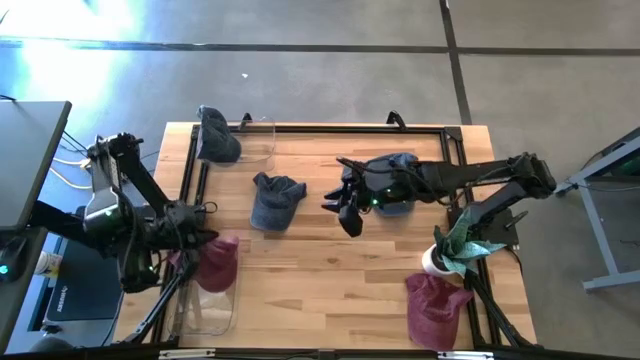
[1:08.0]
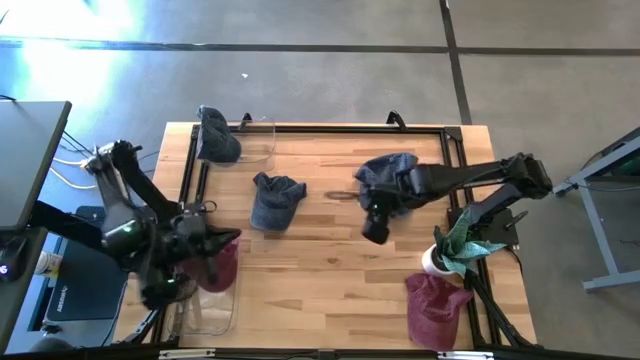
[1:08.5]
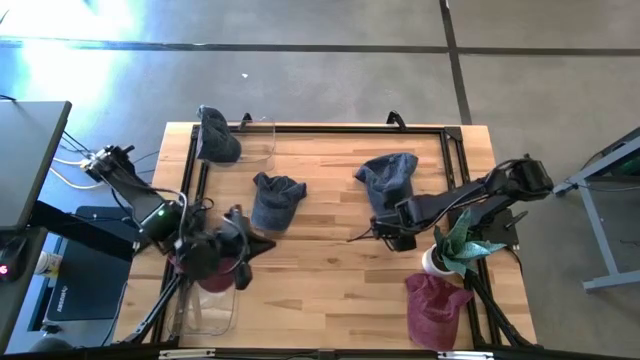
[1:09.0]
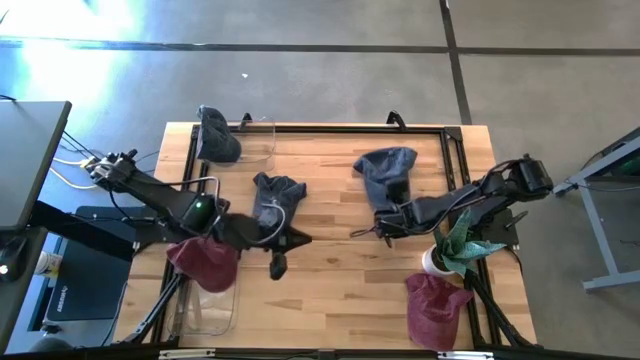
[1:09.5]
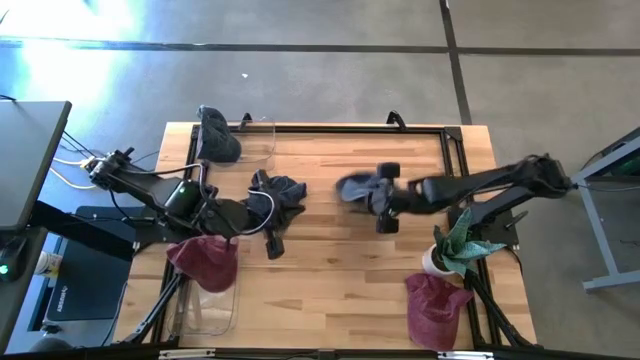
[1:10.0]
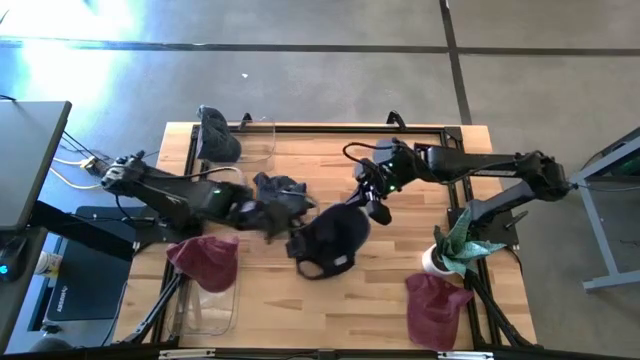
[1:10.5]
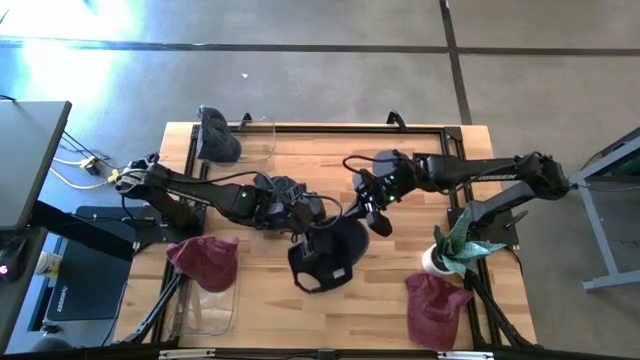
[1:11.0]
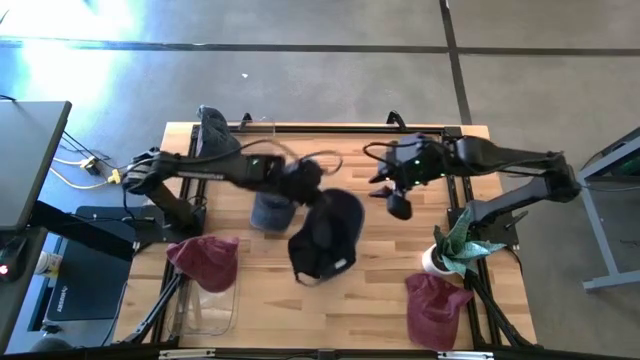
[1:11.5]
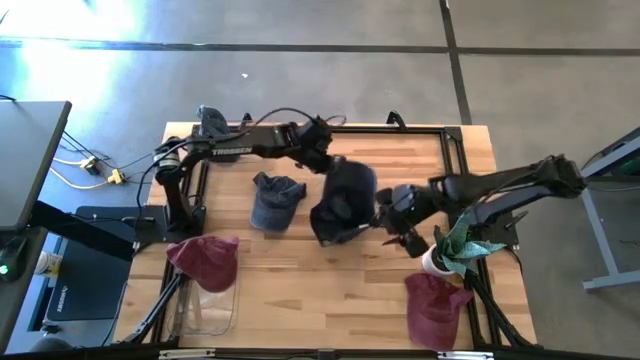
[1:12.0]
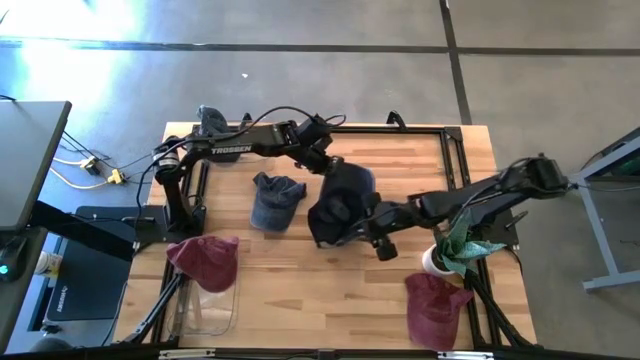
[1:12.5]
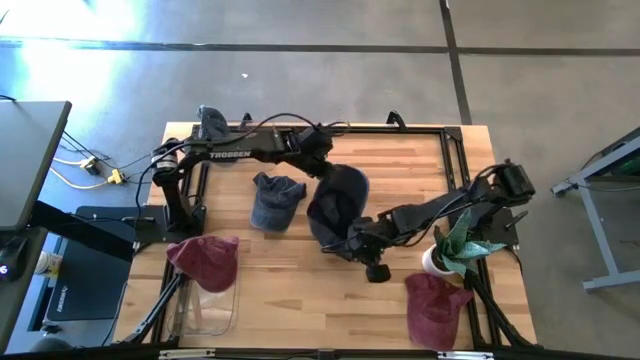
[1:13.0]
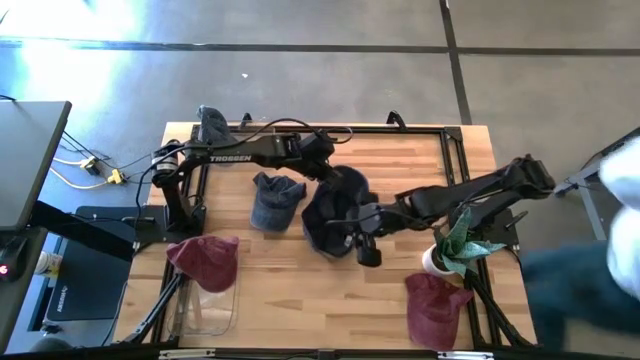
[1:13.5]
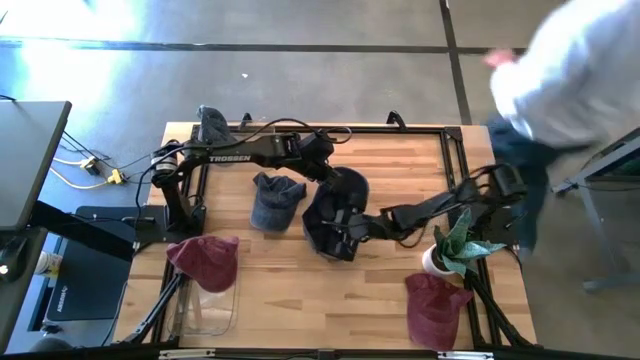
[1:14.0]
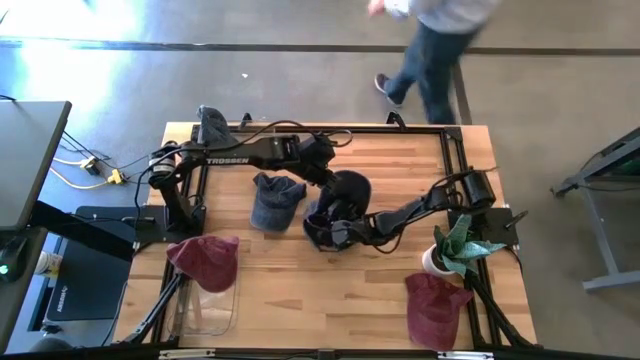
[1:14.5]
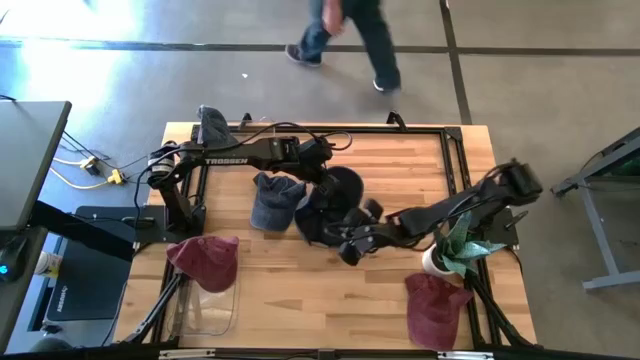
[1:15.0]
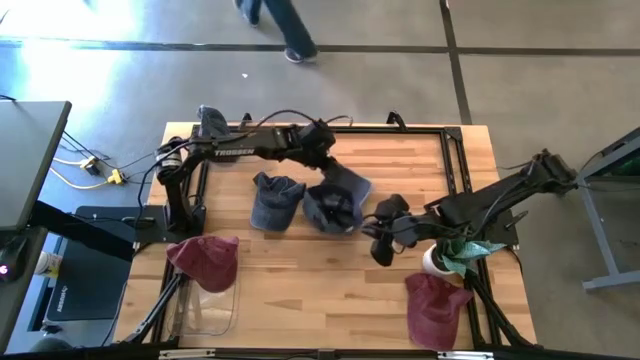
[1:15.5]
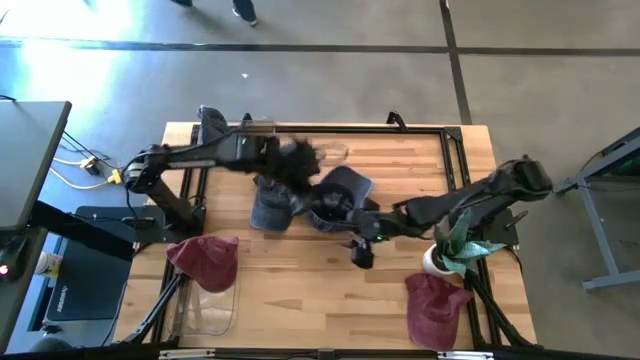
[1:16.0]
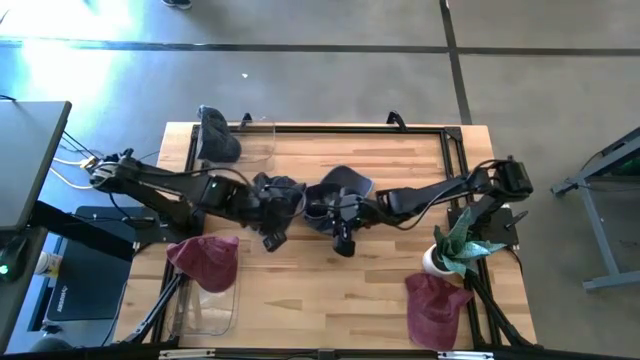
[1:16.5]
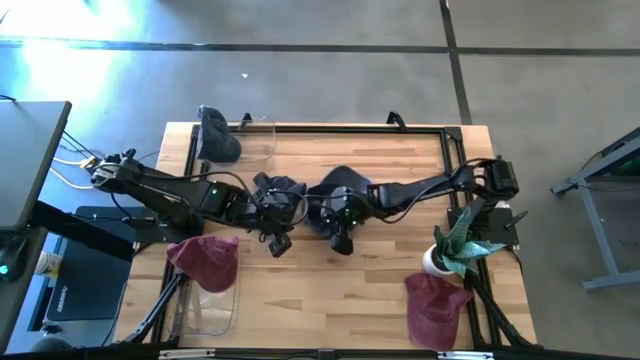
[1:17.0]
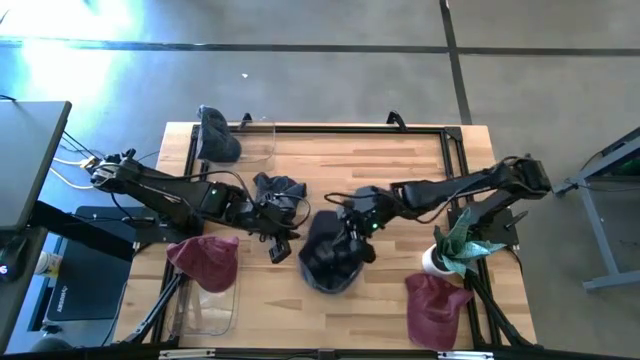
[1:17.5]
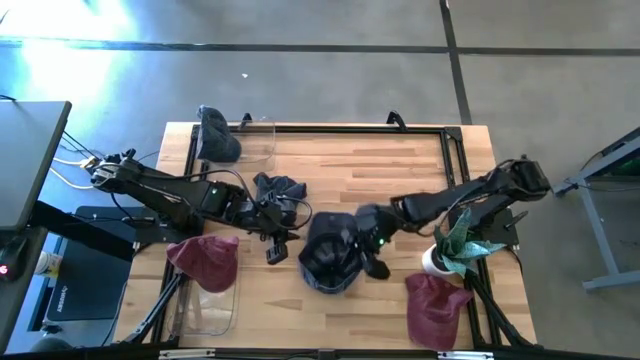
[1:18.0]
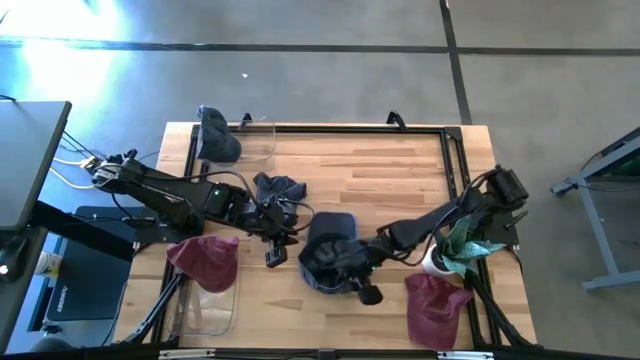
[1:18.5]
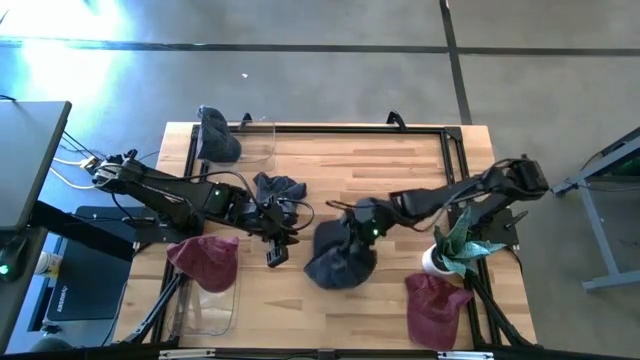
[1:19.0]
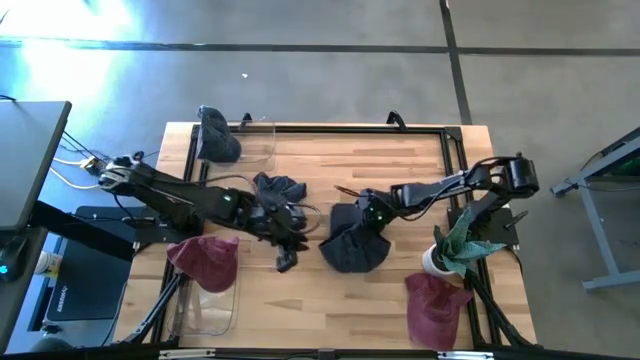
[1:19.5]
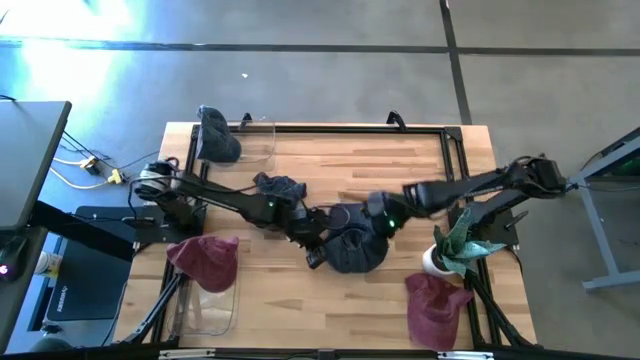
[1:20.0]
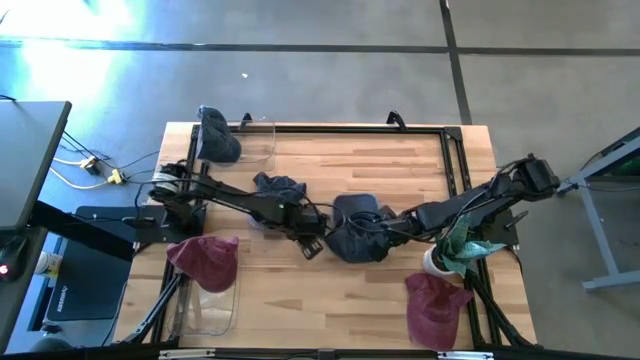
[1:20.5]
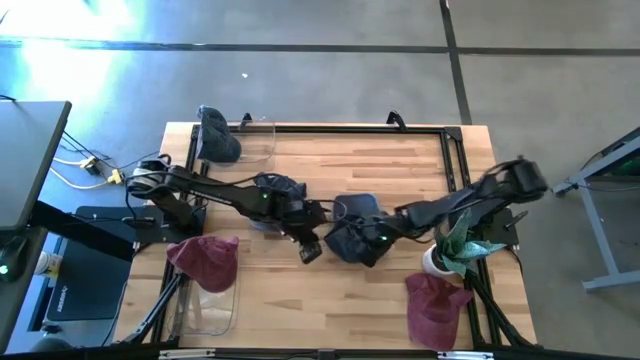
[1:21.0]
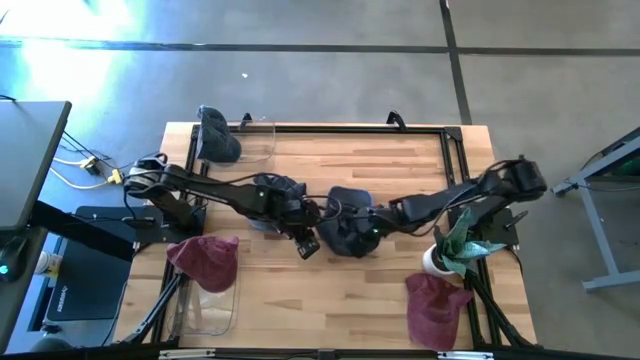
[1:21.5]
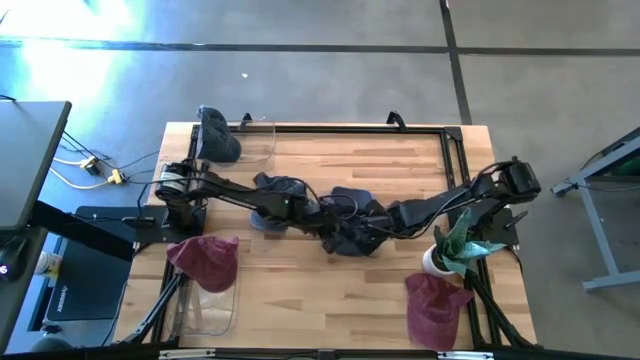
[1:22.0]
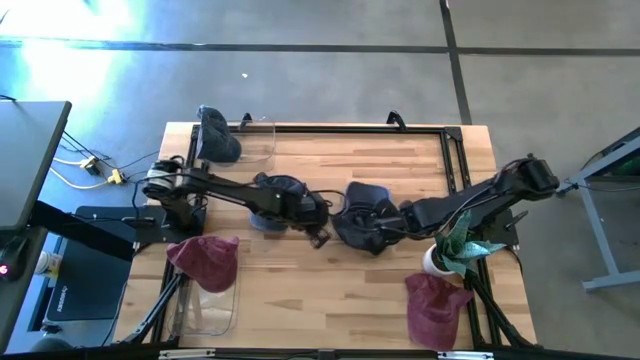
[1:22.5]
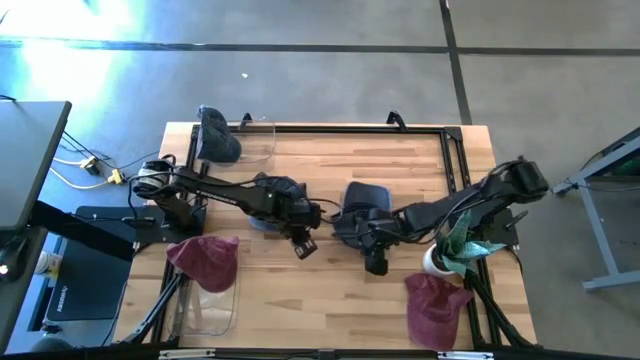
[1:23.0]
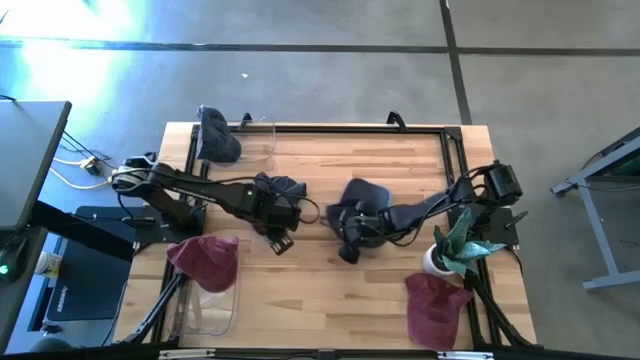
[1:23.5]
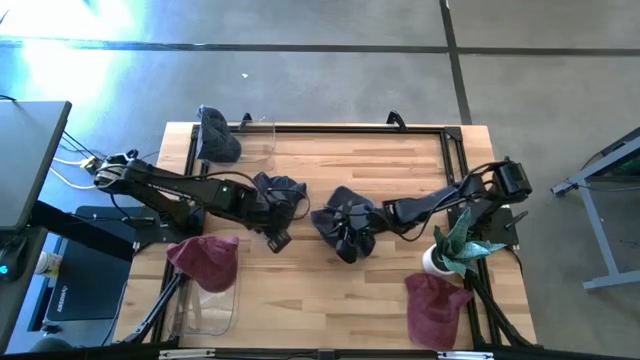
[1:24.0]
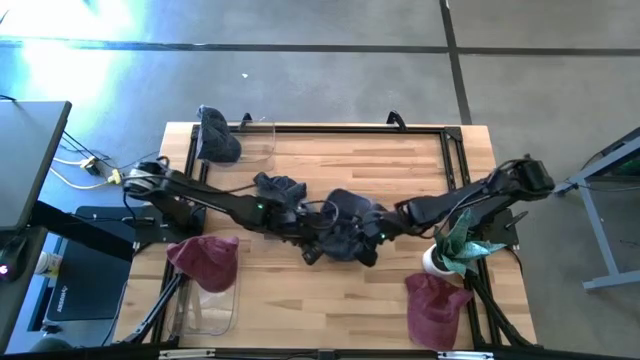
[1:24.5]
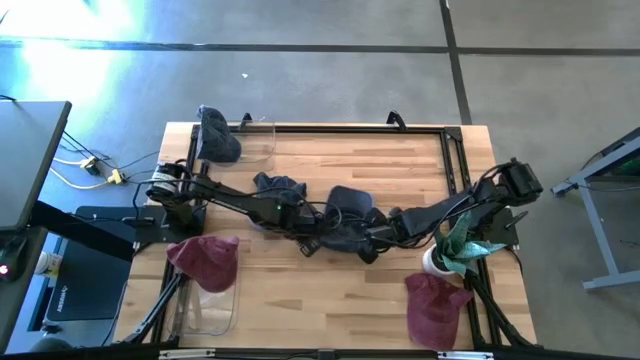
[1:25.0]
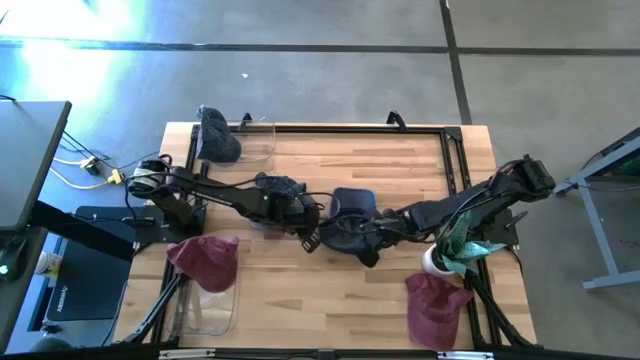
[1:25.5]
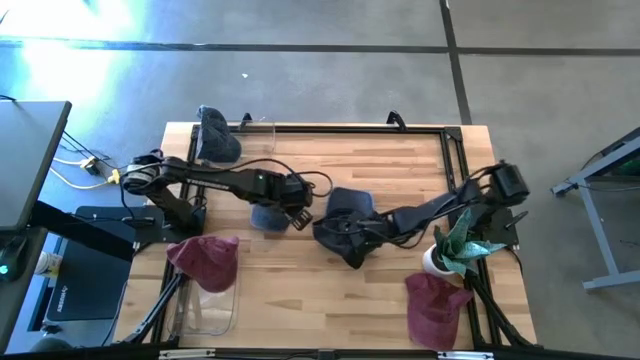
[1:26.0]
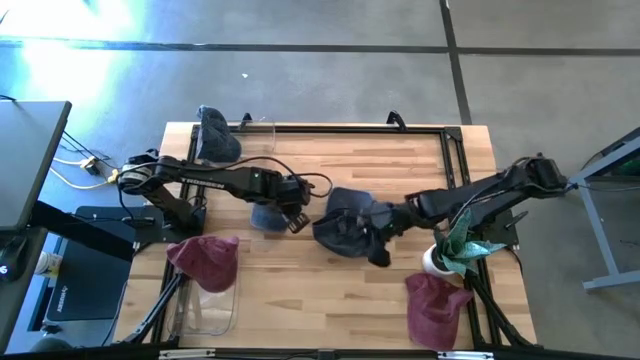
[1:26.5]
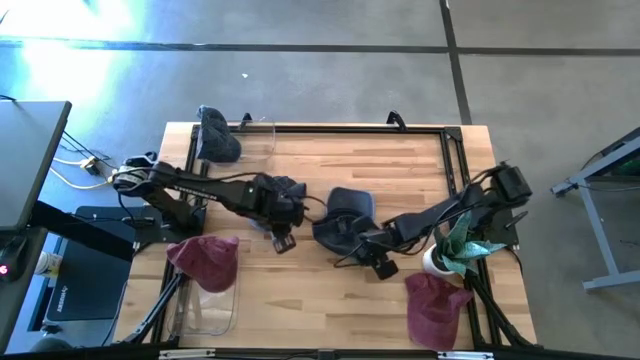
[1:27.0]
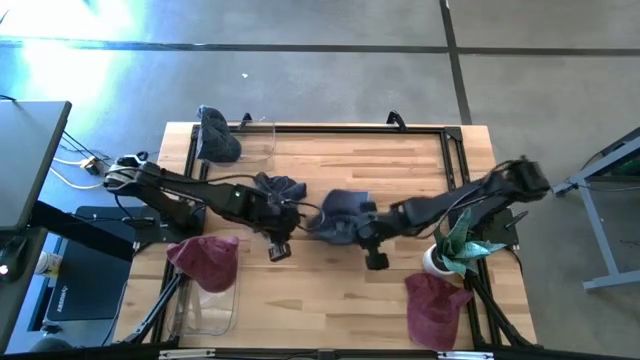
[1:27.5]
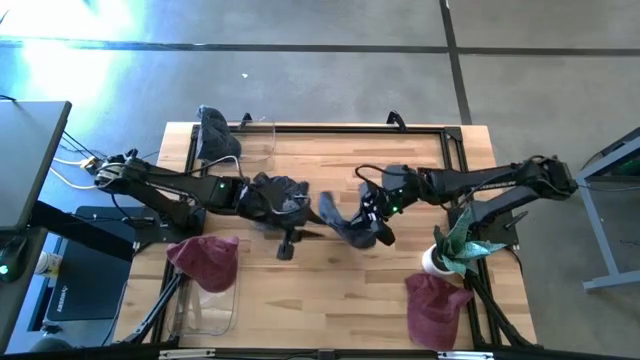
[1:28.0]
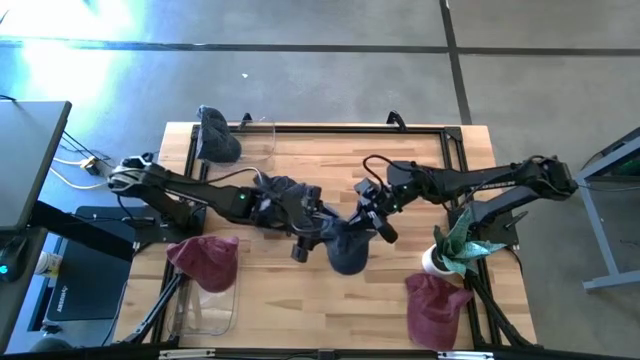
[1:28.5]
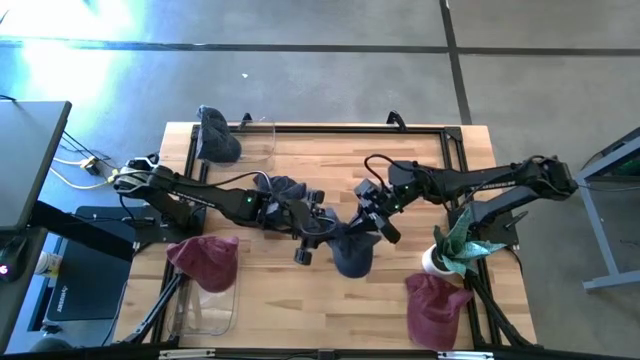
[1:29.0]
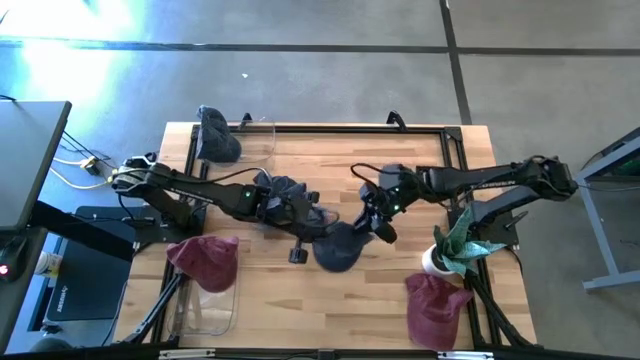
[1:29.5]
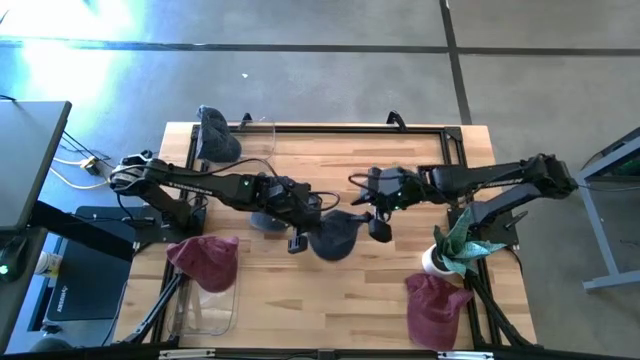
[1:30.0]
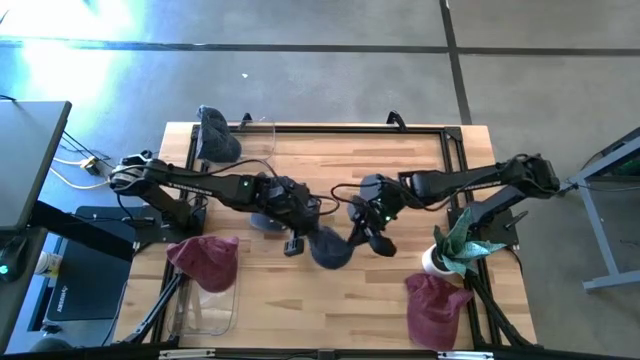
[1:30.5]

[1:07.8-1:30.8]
Task: Pick & Place hat
Put the right blue cap into the top transparent bin
